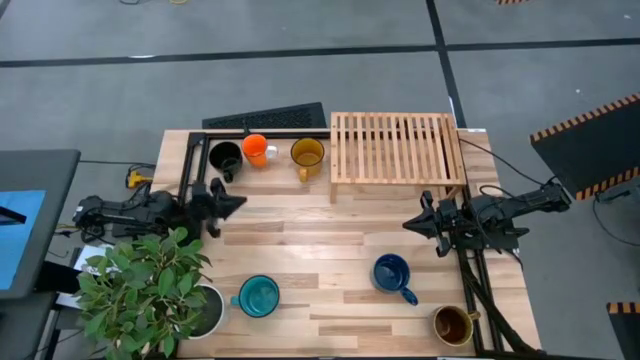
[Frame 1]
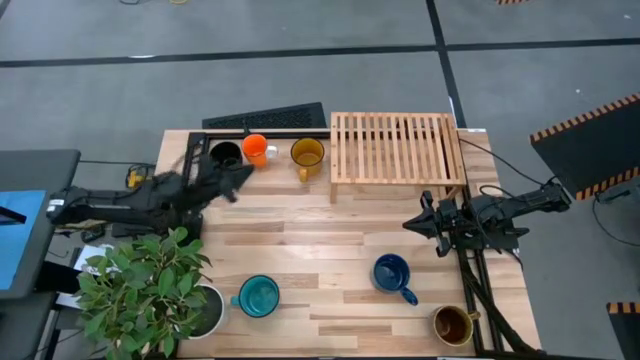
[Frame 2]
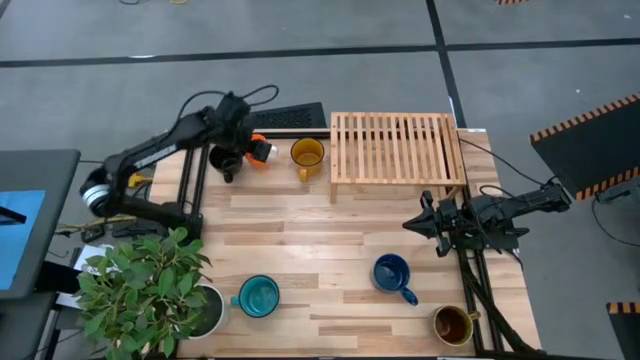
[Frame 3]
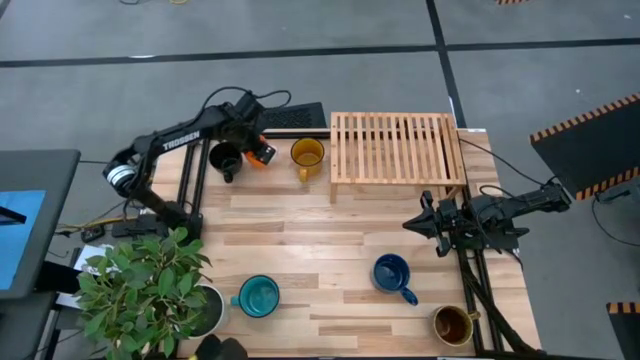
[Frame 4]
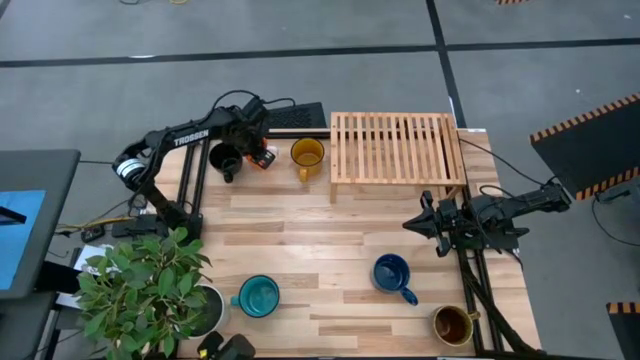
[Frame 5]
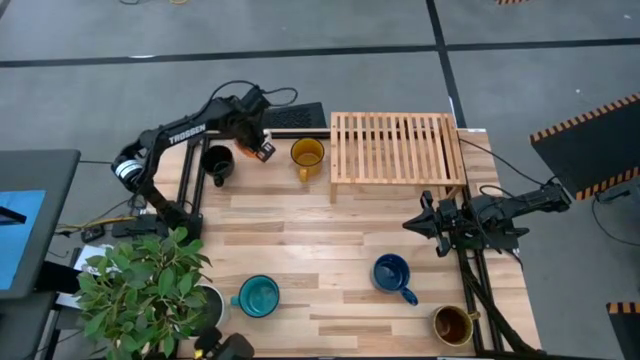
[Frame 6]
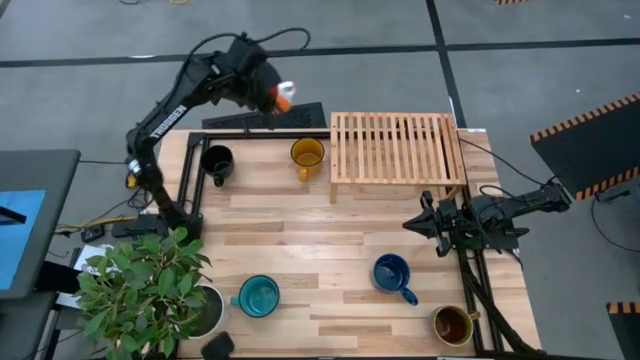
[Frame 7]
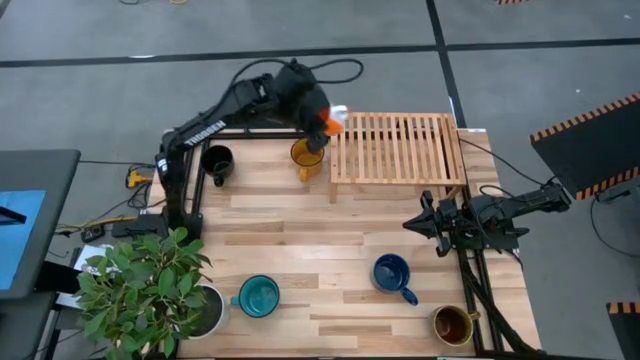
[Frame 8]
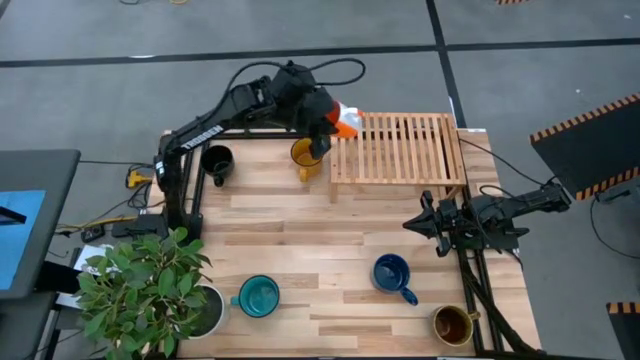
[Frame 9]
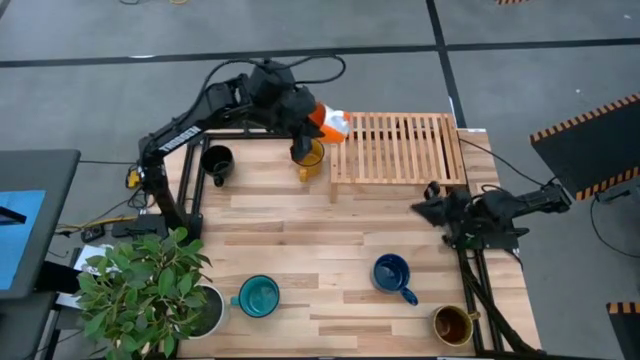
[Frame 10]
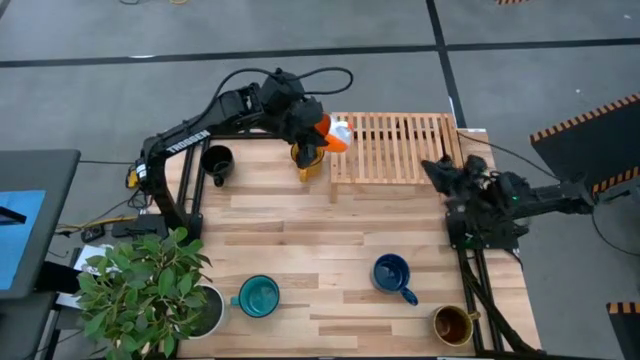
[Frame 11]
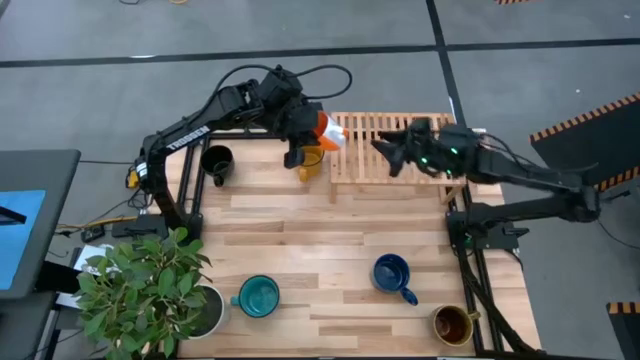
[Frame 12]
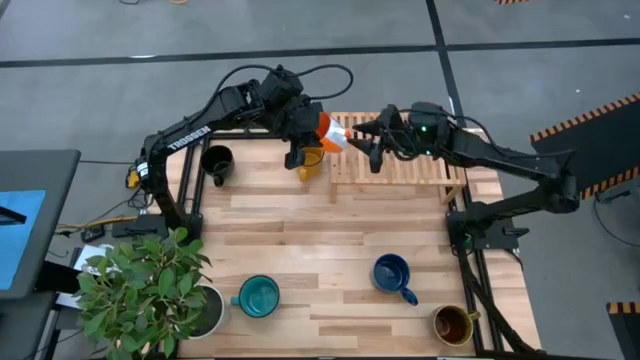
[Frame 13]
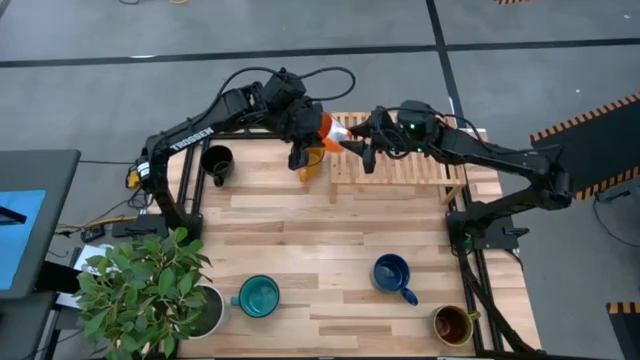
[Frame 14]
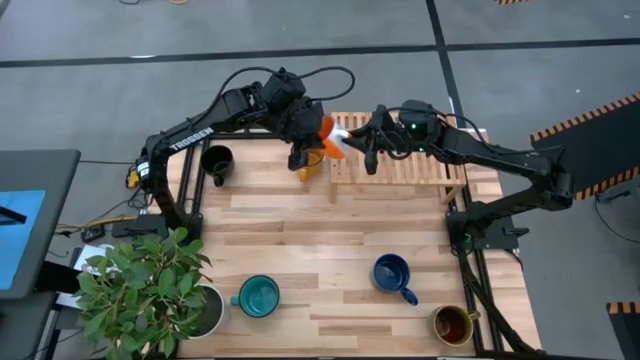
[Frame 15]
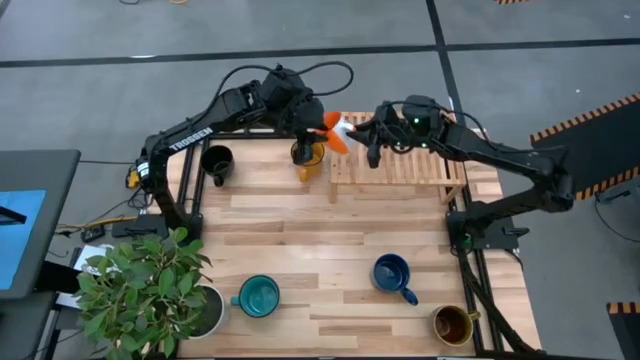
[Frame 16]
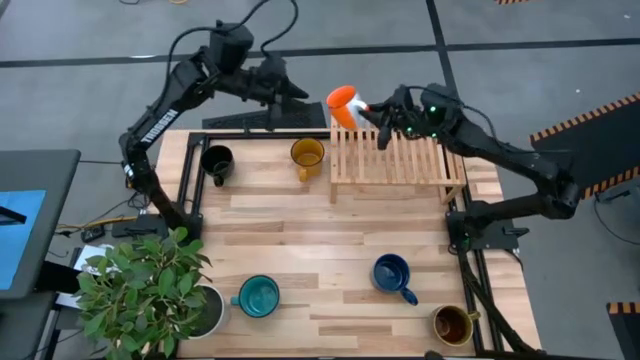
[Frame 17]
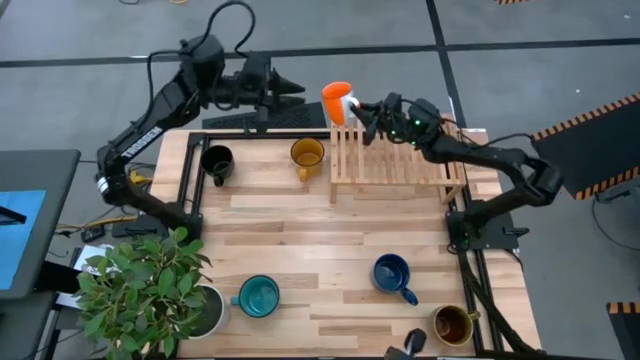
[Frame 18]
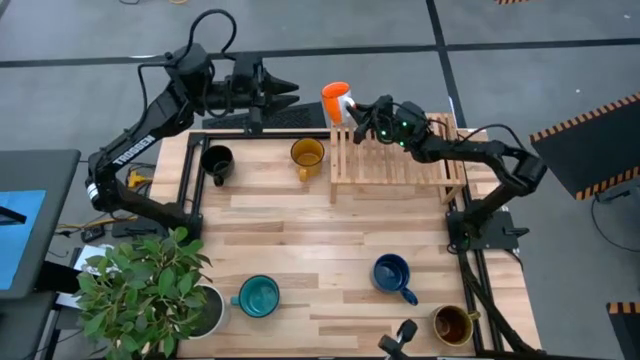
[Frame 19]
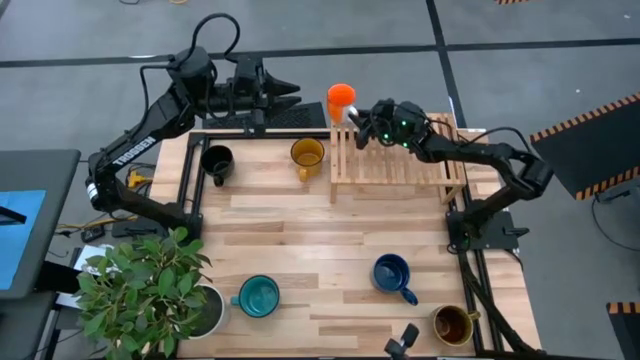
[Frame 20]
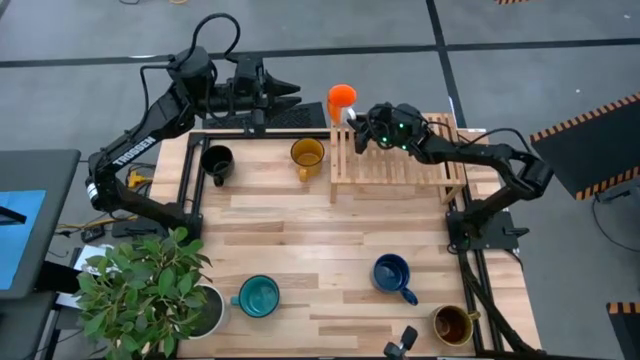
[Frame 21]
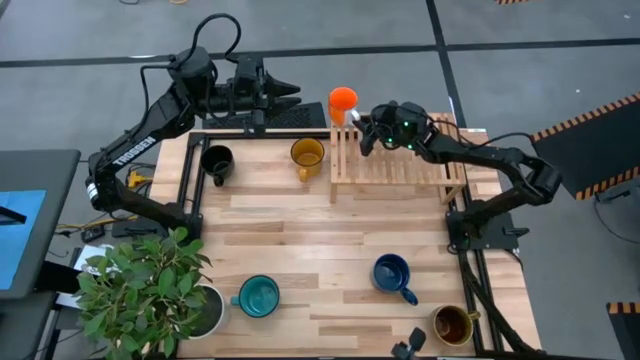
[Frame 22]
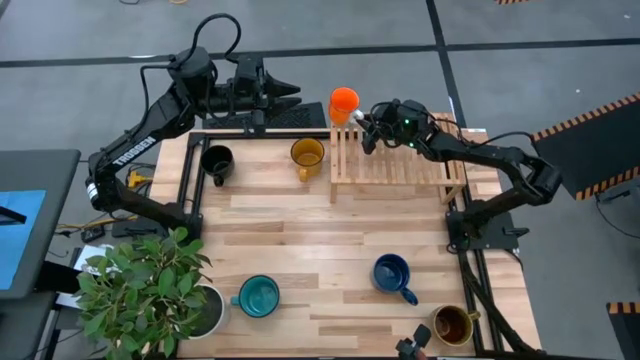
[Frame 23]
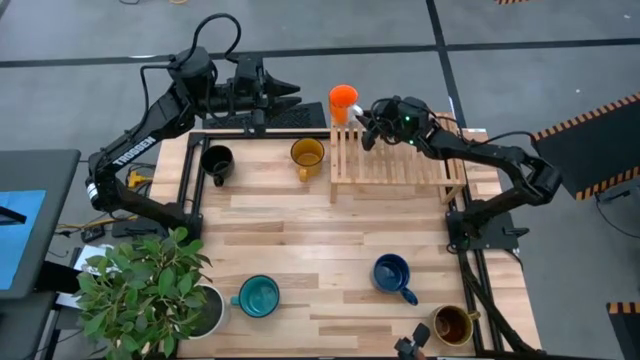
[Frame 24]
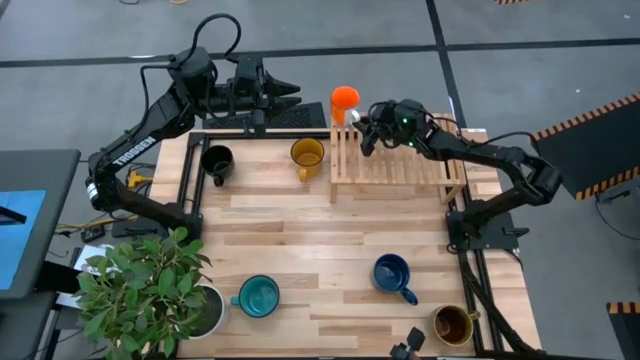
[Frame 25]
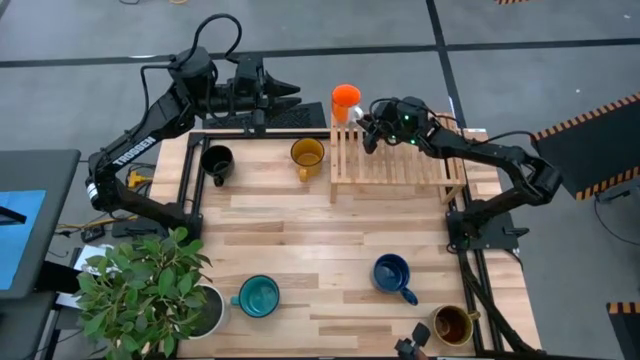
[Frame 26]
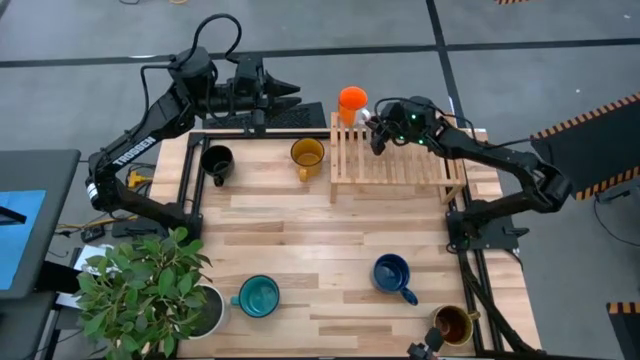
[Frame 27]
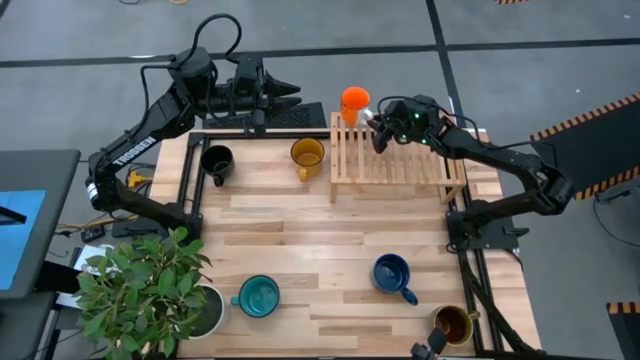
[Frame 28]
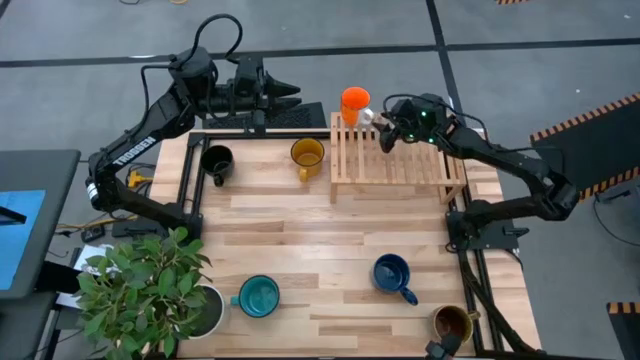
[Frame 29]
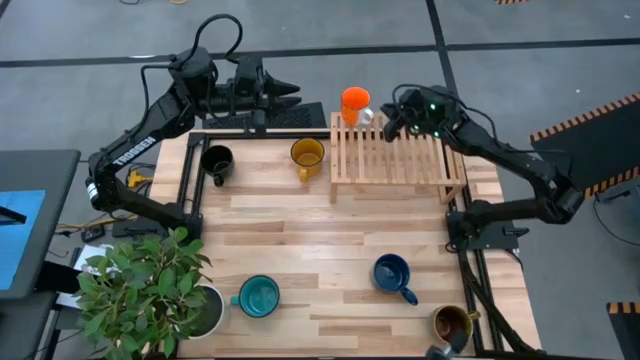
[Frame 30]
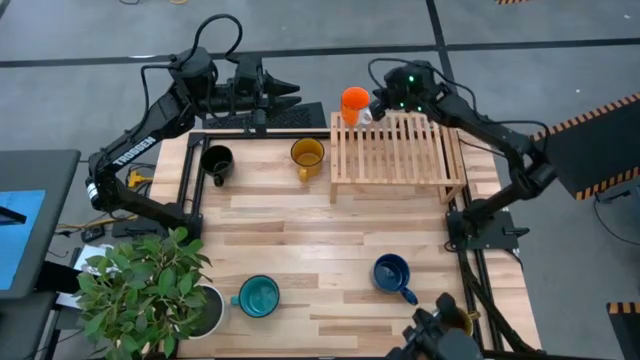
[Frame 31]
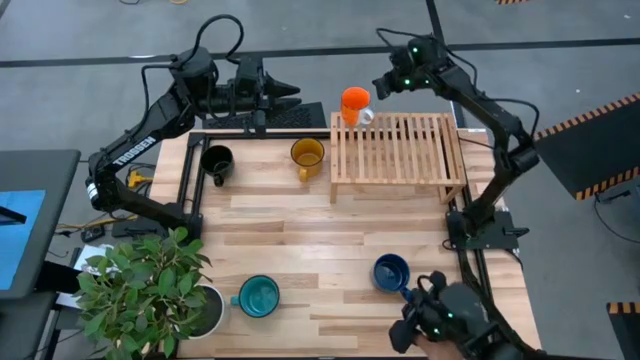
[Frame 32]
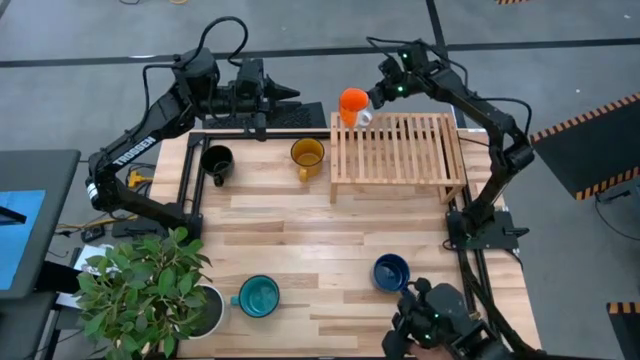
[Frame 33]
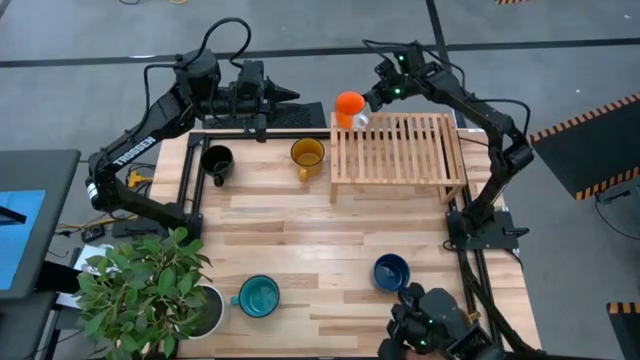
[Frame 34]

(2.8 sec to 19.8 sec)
Task: Place coffee mugs
Put the orange mug on the shelf

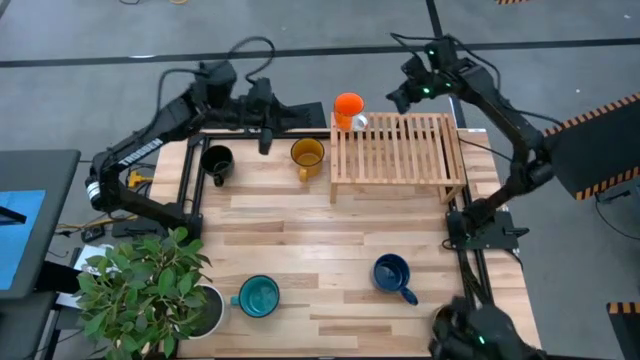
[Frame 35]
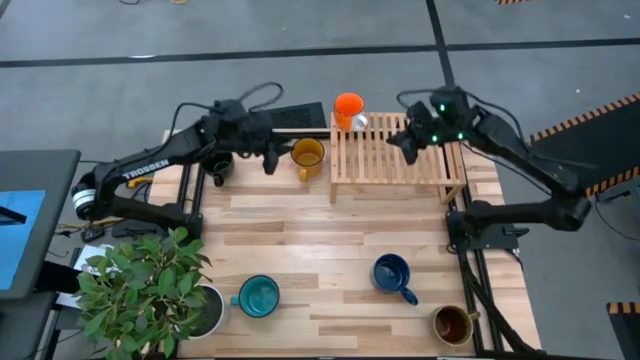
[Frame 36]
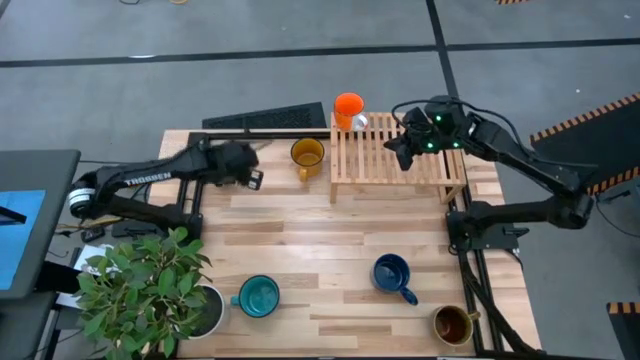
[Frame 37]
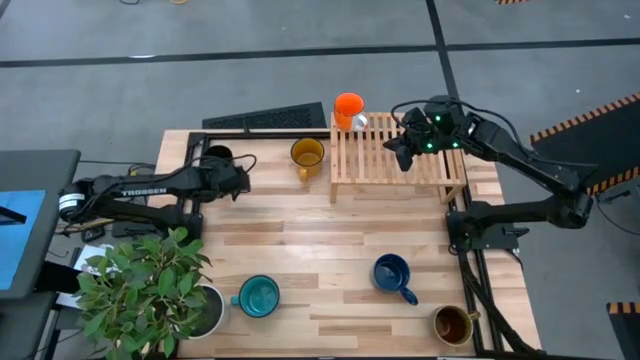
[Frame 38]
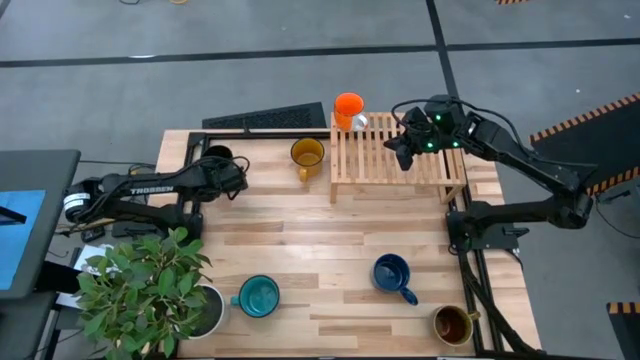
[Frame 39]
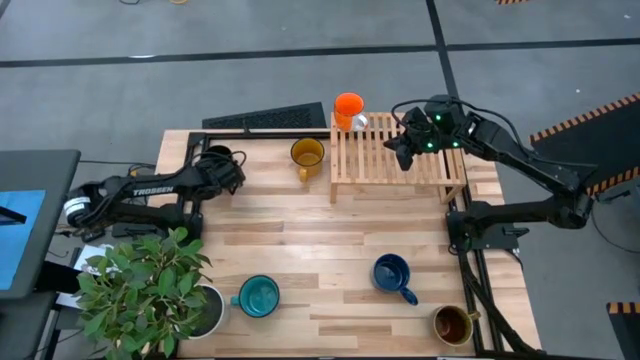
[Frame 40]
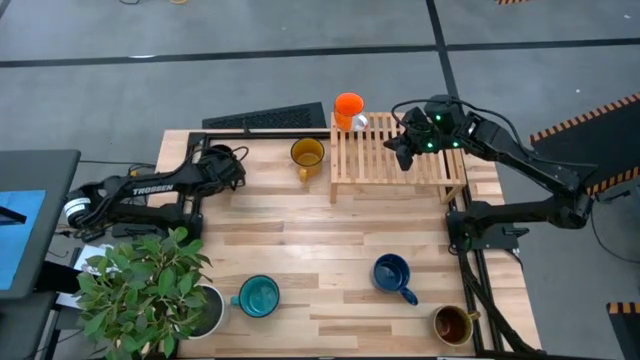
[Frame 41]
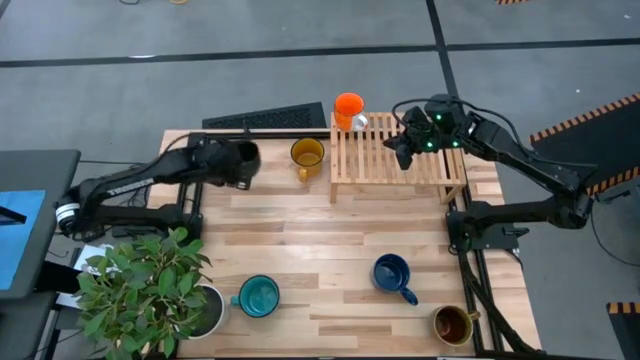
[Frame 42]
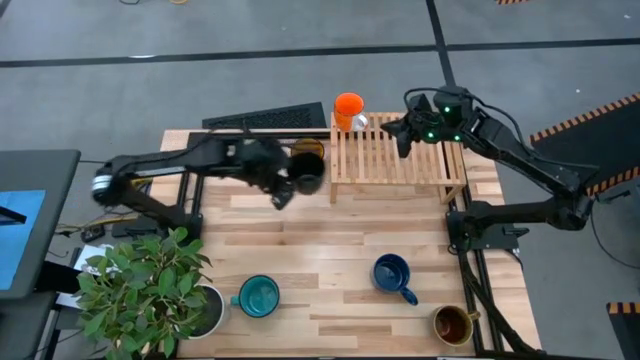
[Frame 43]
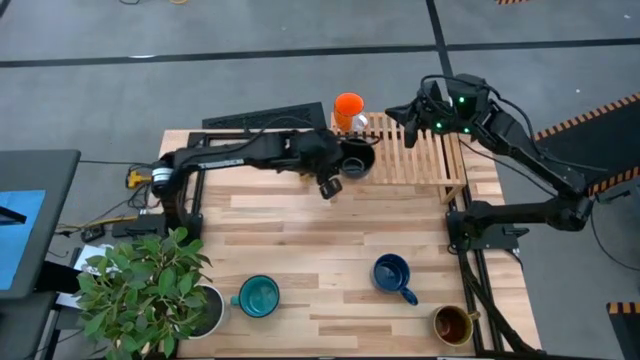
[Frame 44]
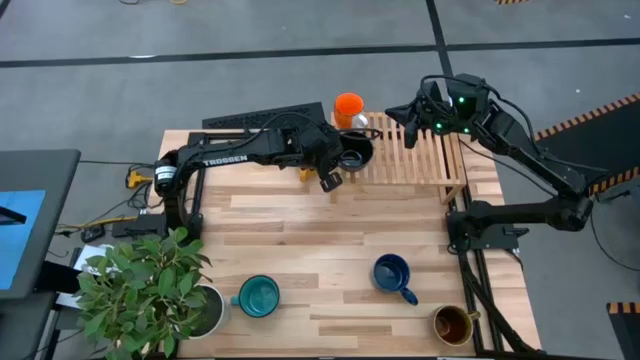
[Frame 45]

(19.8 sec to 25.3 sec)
Put the black mug on the shelf
